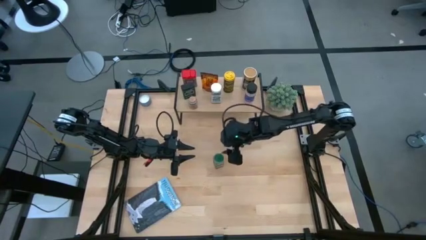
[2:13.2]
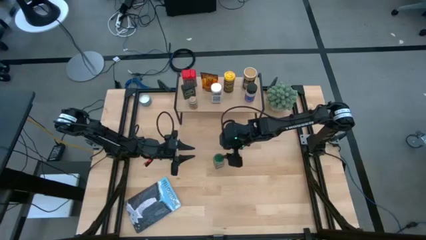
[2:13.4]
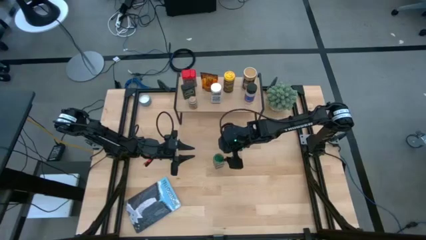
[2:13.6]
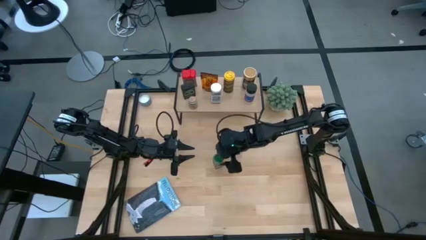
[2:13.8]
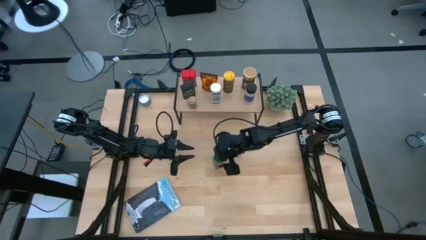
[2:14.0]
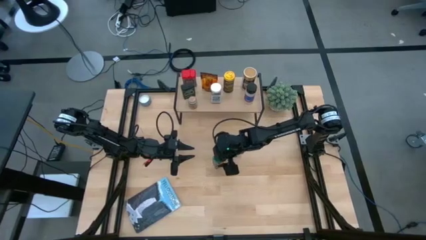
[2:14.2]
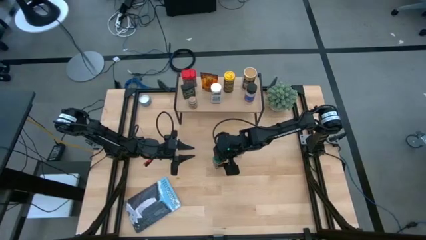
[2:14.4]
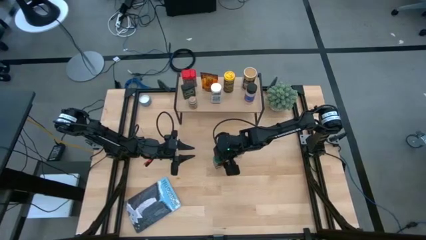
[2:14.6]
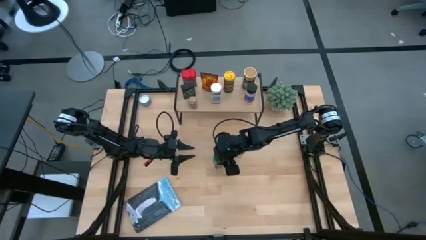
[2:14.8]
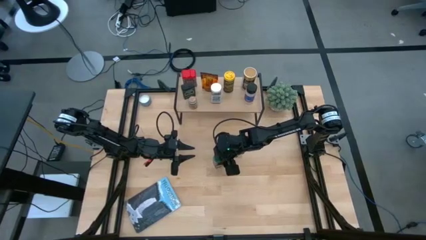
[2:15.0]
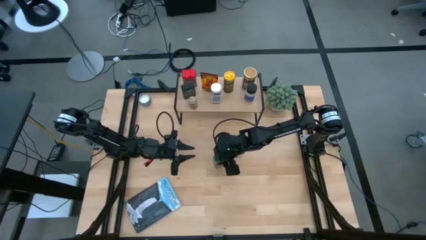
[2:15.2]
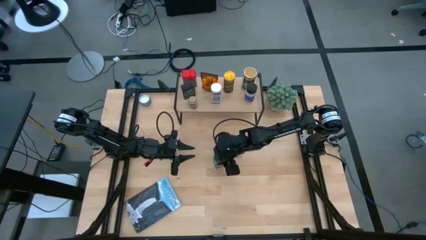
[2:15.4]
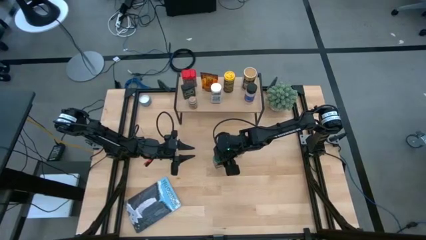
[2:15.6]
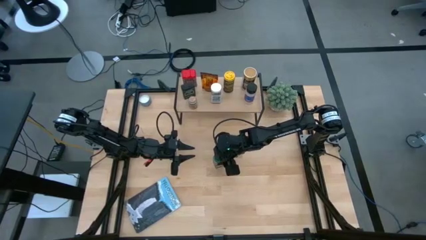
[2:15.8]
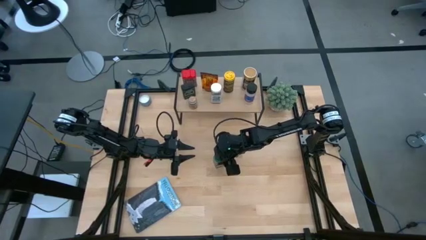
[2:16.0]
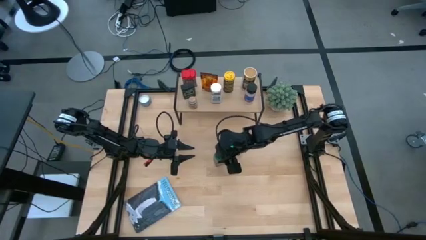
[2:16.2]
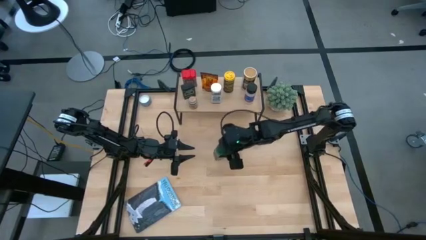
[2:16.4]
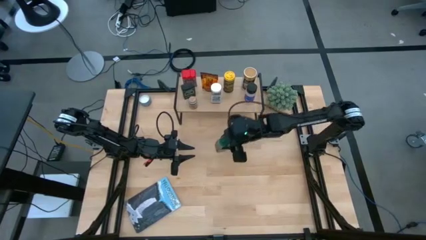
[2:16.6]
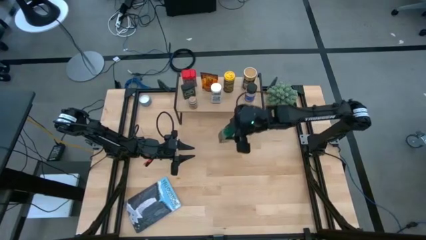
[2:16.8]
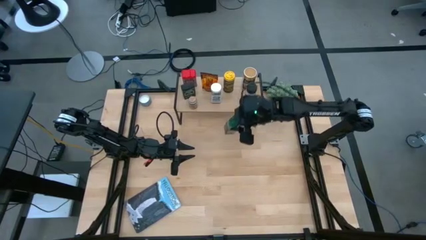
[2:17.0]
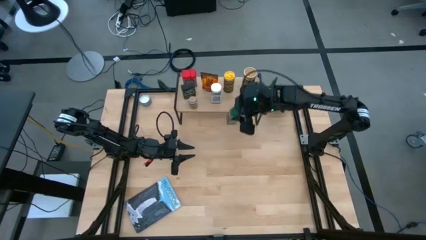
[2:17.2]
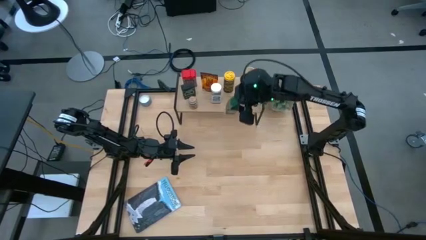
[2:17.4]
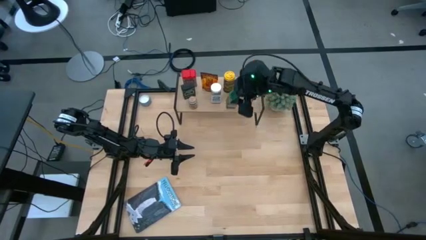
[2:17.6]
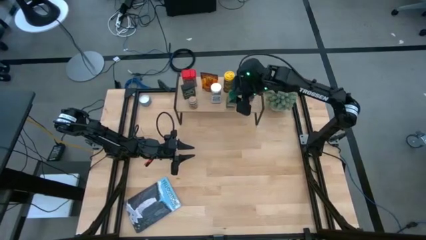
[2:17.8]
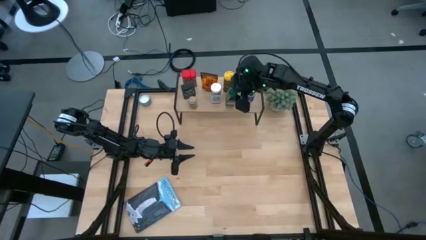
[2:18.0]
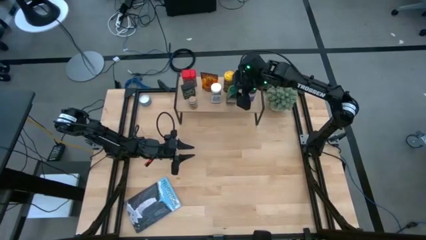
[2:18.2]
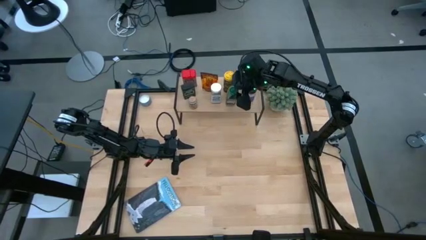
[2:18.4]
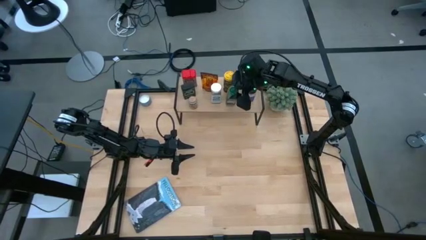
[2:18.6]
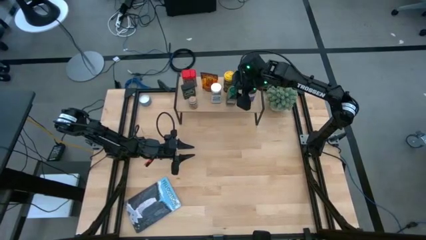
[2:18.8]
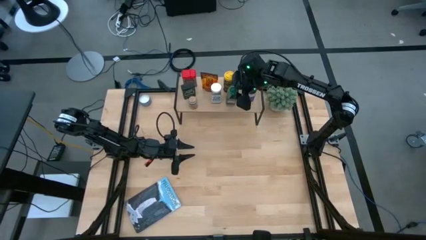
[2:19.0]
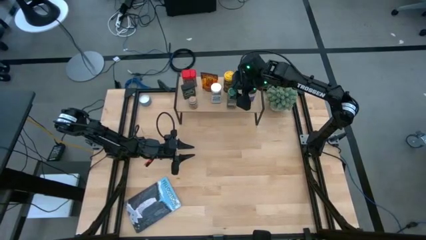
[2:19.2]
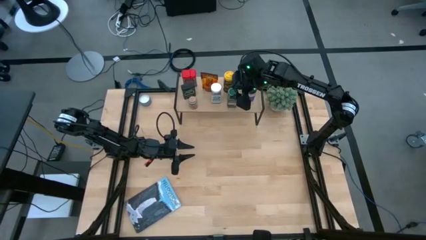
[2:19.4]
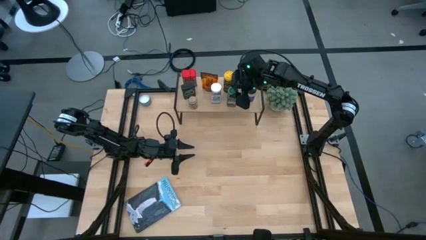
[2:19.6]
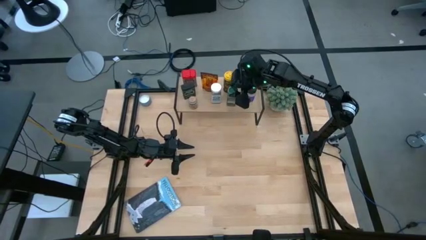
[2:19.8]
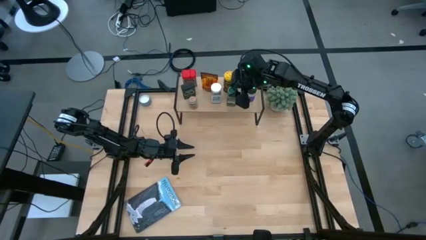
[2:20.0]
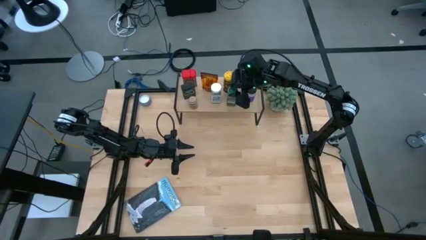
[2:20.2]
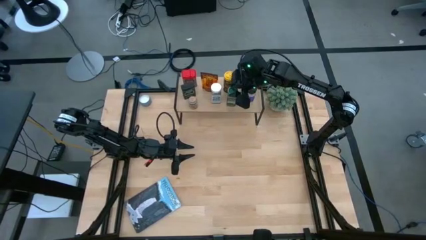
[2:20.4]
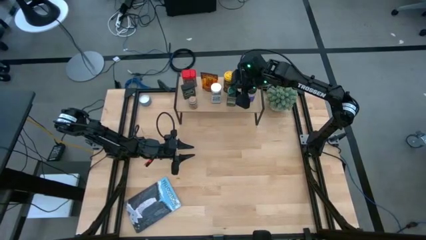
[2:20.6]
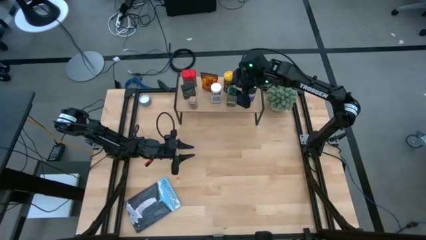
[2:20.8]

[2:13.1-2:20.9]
Task: Shelf spices
Put the green bottle seasoning on the shelf

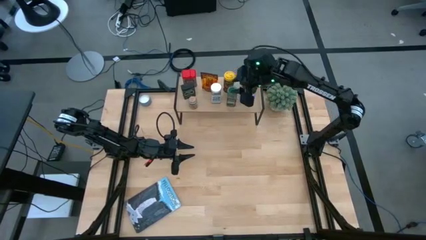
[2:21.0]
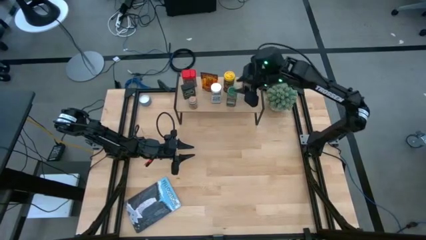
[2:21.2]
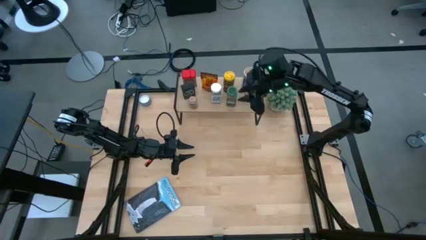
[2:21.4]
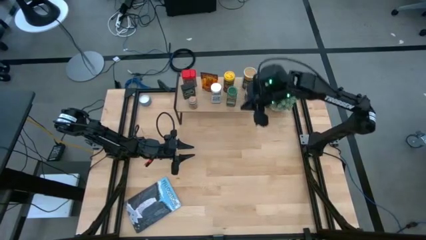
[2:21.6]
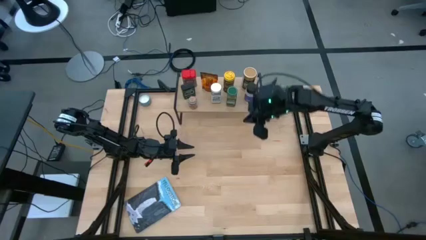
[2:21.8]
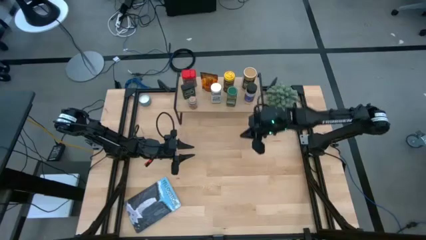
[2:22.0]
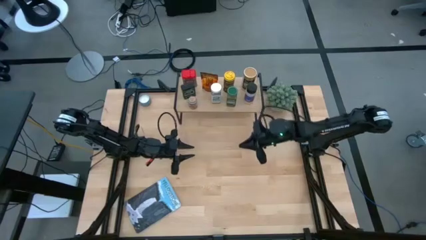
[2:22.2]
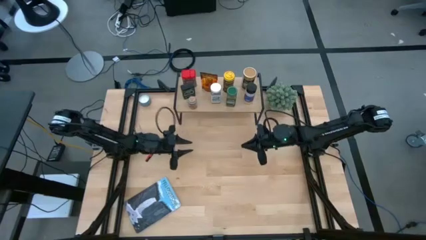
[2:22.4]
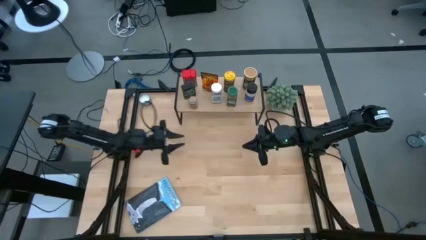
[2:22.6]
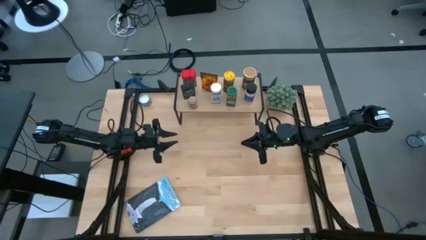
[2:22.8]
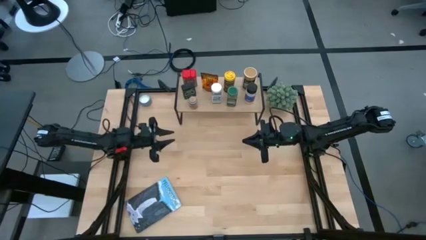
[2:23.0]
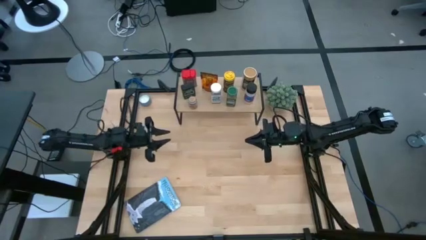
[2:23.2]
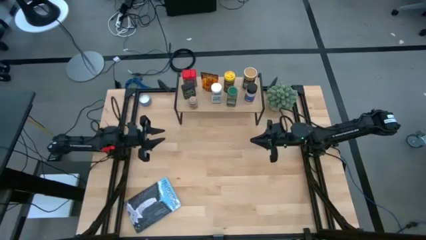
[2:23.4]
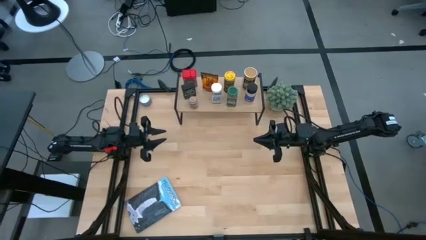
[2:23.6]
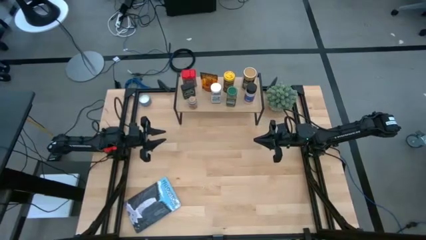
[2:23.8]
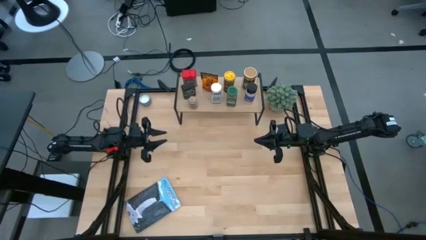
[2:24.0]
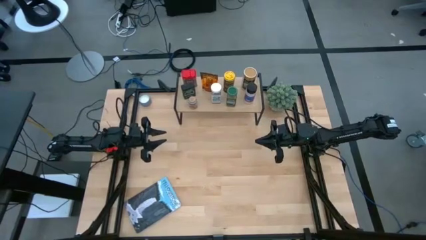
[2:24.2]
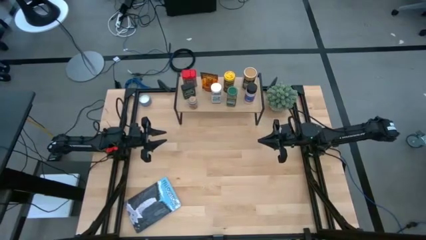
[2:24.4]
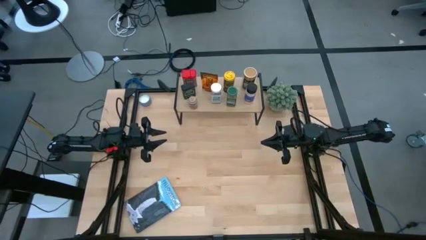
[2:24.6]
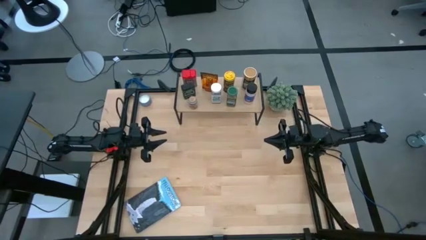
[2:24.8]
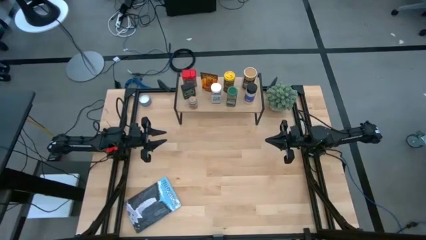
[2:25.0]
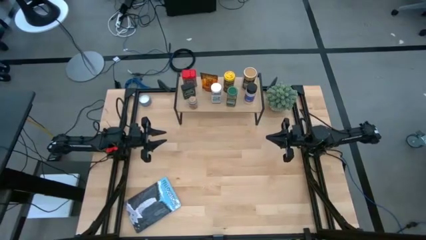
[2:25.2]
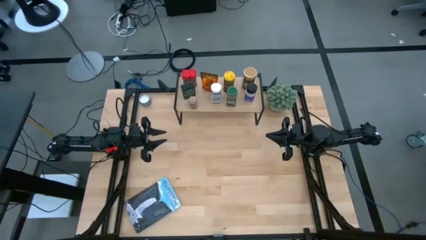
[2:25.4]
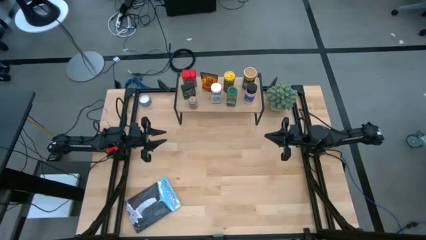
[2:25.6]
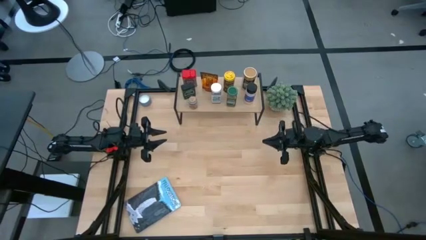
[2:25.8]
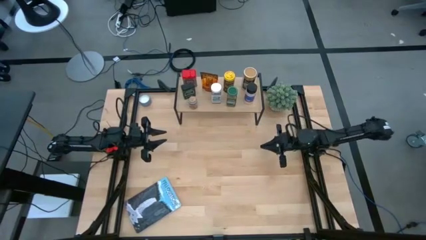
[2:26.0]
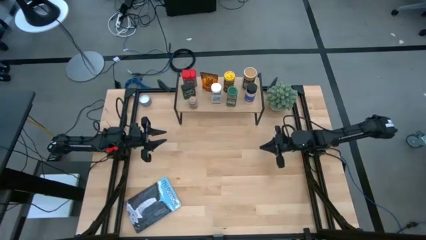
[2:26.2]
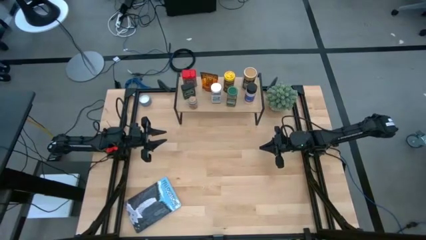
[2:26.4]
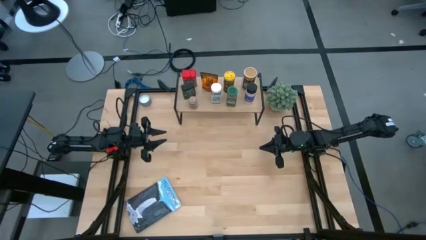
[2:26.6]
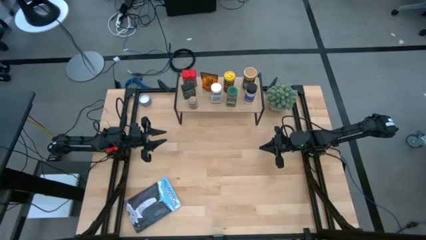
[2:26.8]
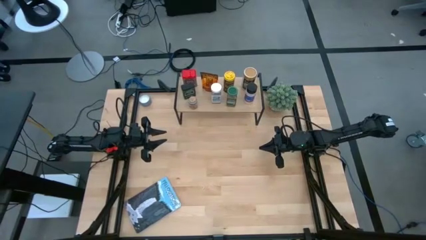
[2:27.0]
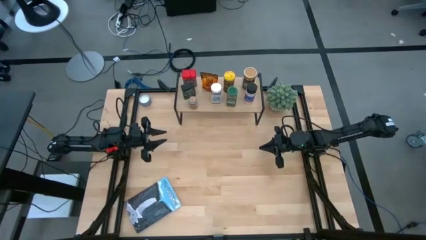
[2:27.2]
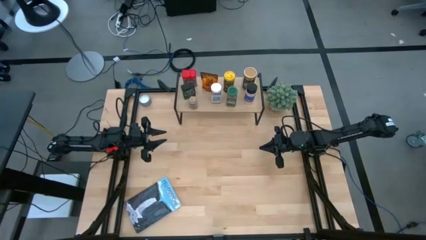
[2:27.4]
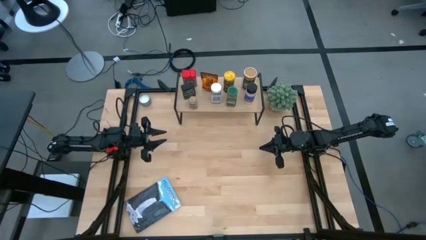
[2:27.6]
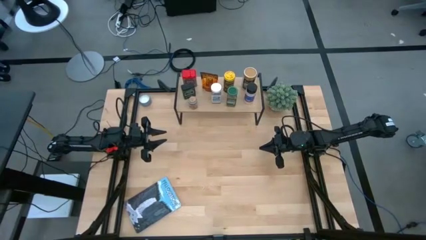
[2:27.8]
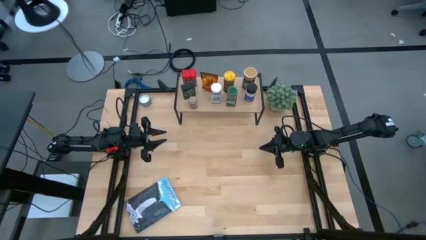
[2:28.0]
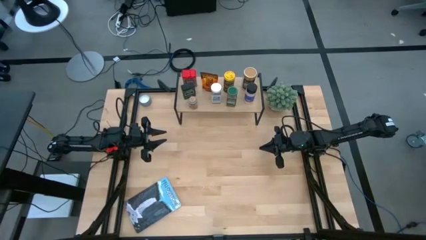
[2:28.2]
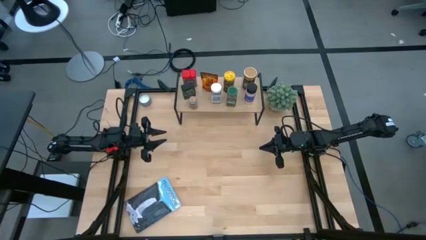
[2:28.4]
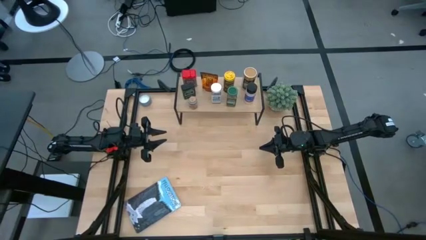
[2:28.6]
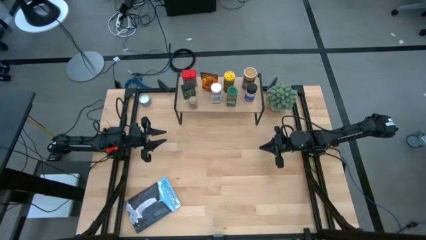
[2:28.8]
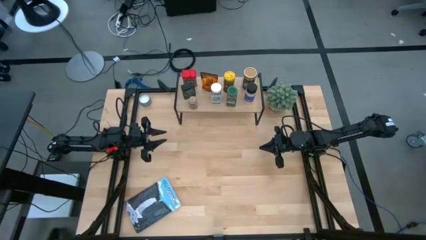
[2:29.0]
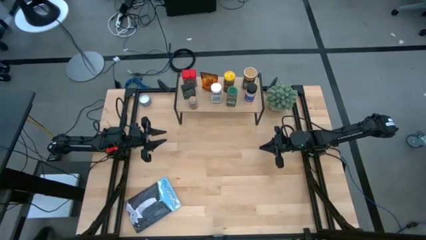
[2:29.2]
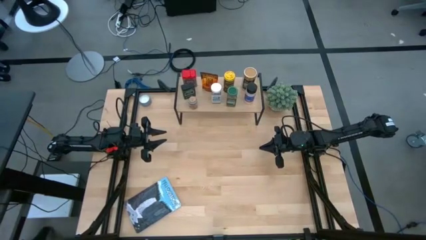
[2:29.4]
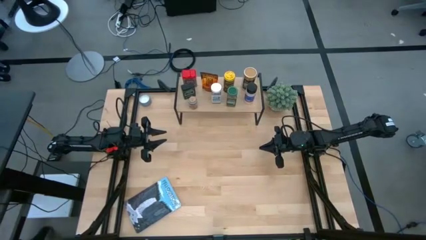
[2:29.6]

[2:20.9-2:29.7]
Return to Home Position
